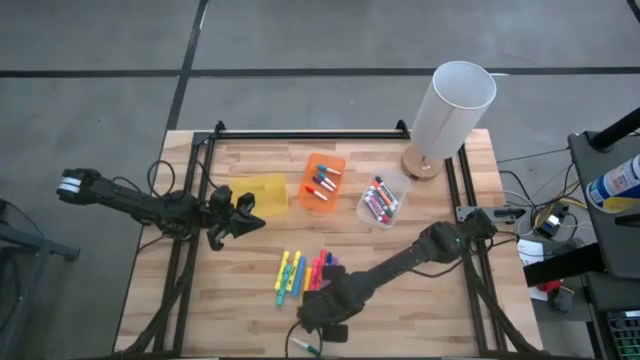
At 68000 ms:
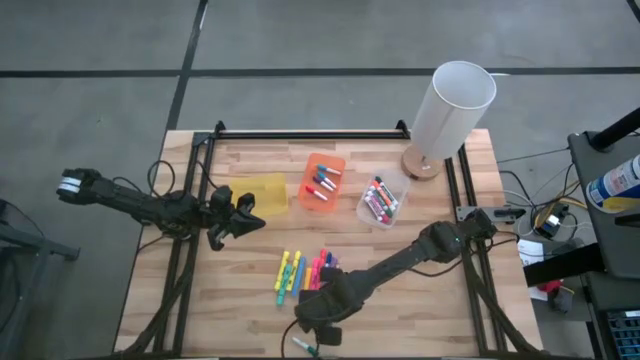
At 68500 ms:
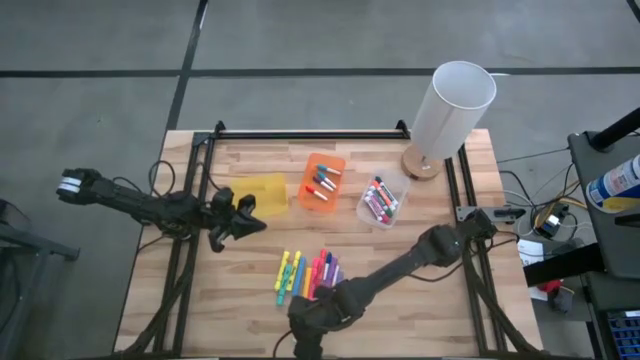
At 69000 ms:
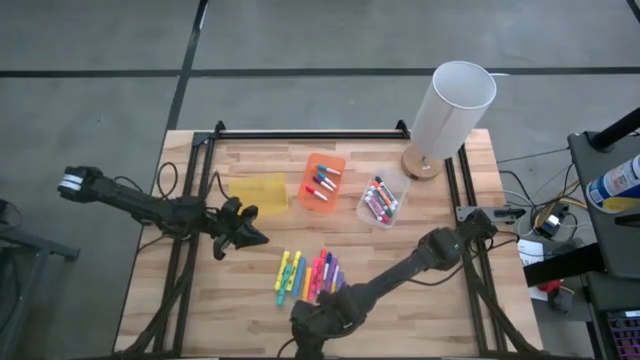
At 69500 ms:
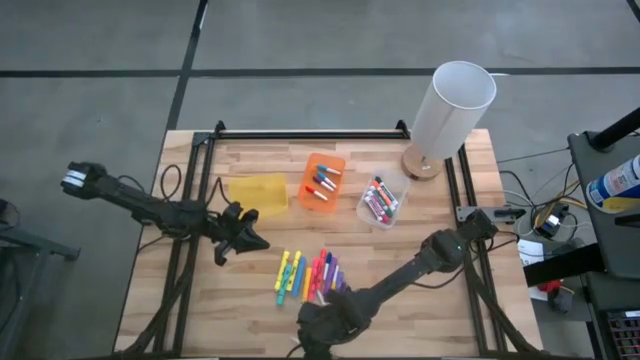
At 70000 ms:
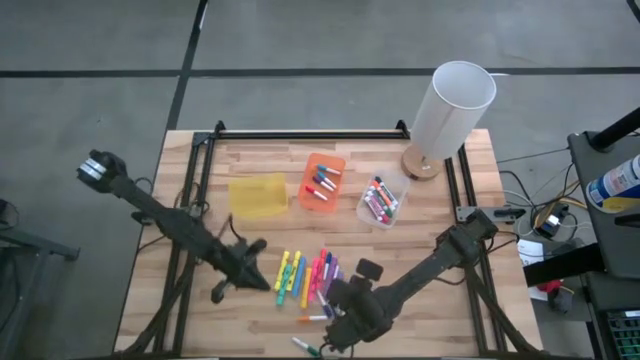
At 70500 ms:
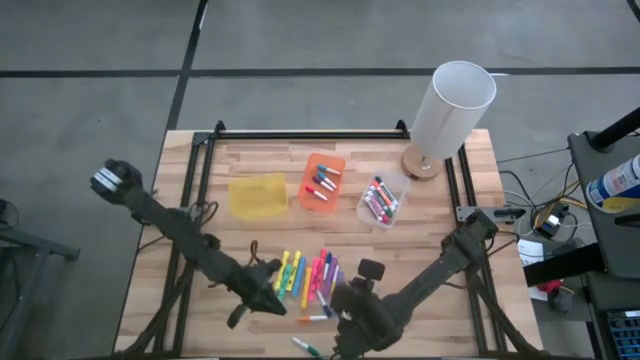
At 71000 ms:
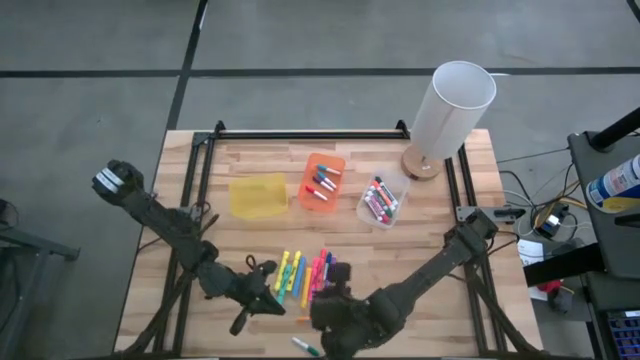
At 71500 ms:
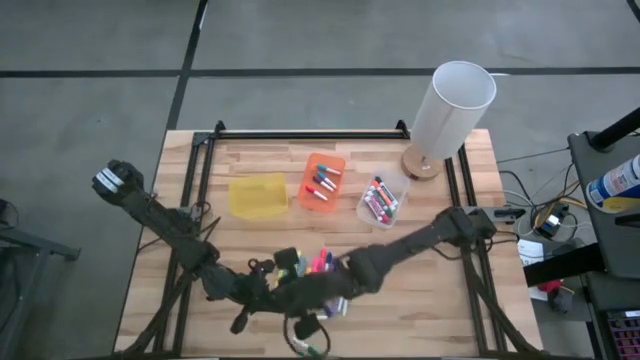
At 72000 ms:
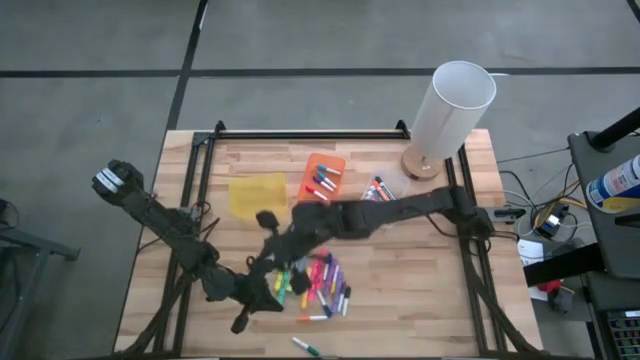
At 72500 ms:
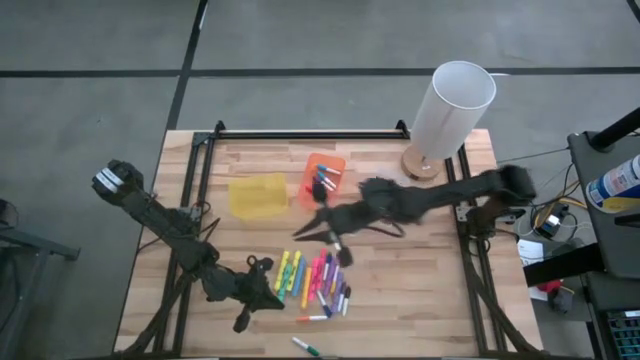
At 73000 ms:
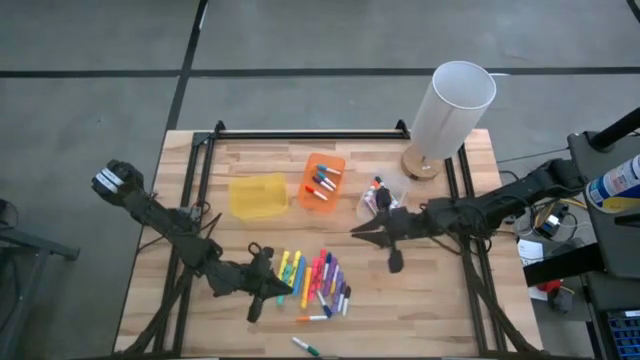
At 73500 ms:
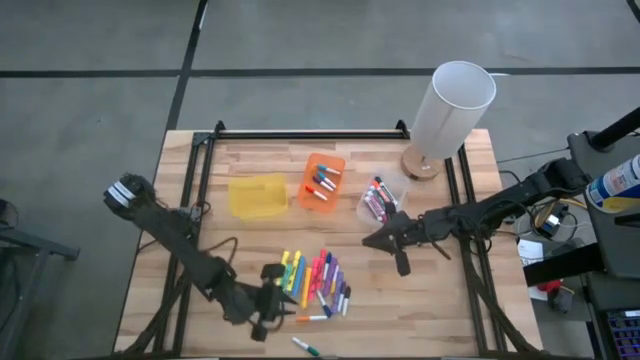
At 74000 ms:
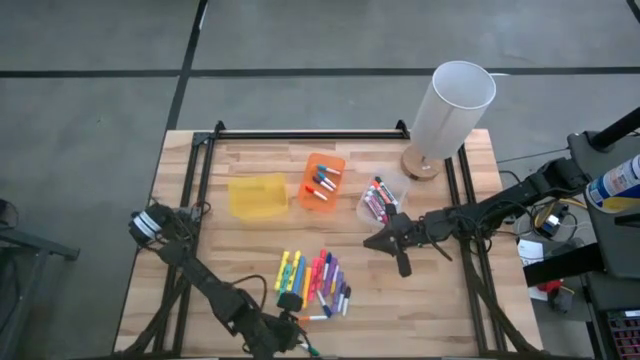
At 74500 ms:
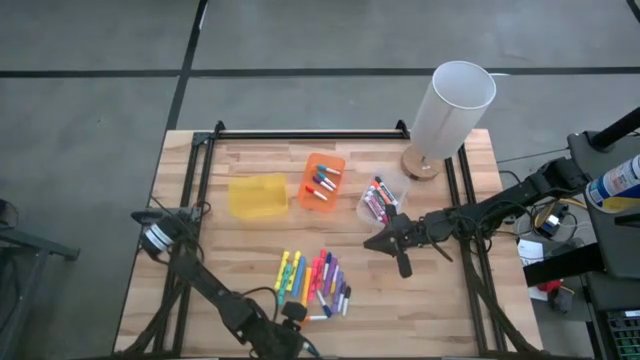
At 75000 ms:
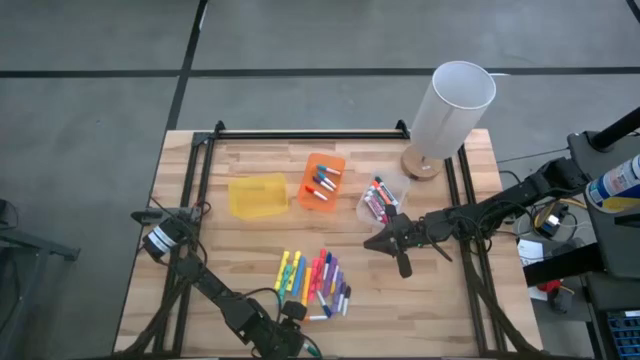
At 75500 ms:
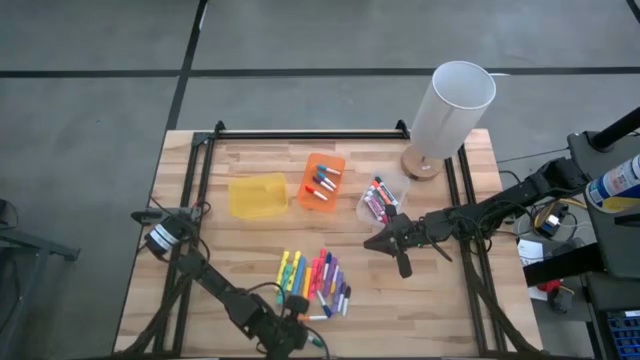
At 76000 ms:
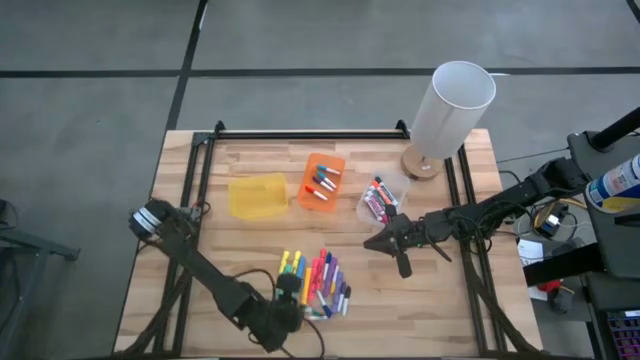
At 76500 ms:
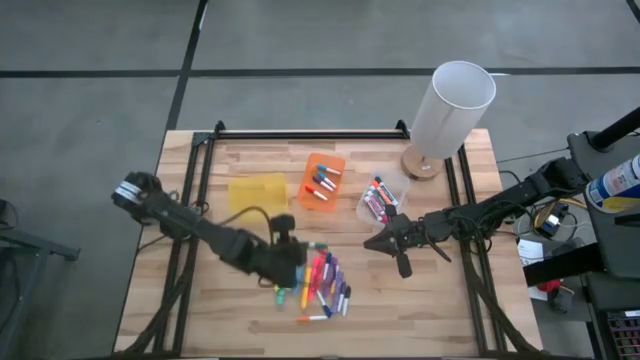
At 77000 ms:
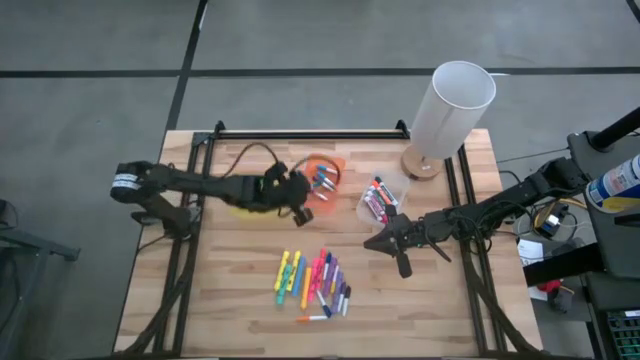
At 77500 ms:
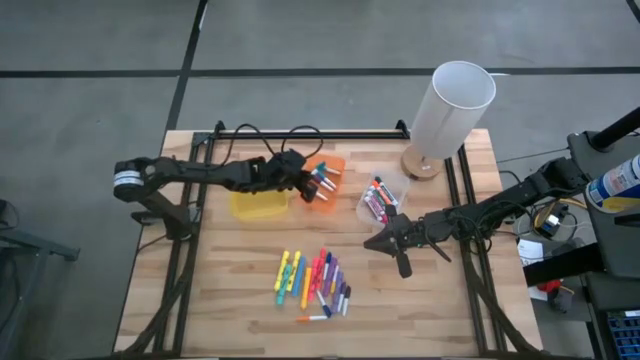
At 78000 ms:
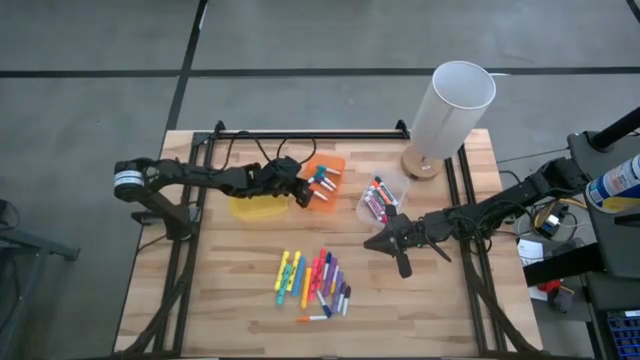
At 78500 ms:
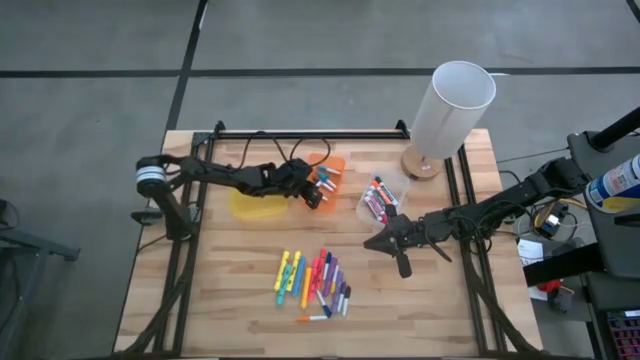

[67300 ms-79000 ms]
Task: Pick & Place Markers
Put the green pen into the orange bin

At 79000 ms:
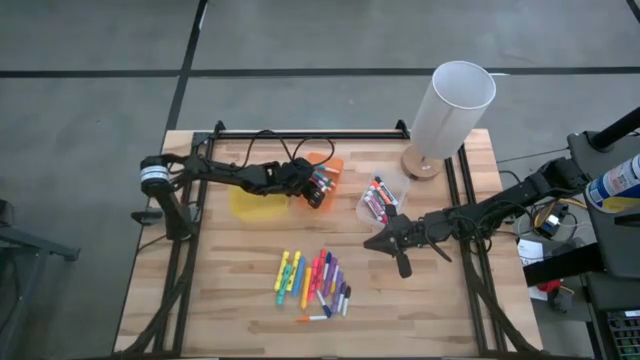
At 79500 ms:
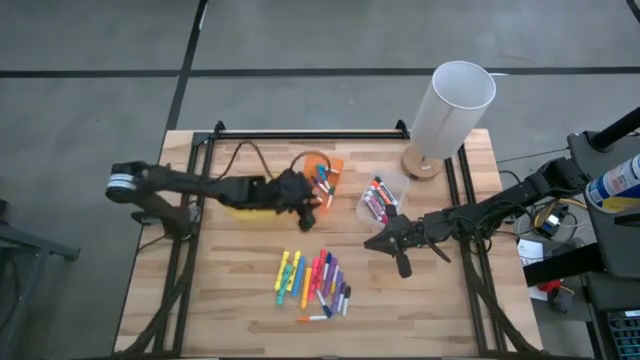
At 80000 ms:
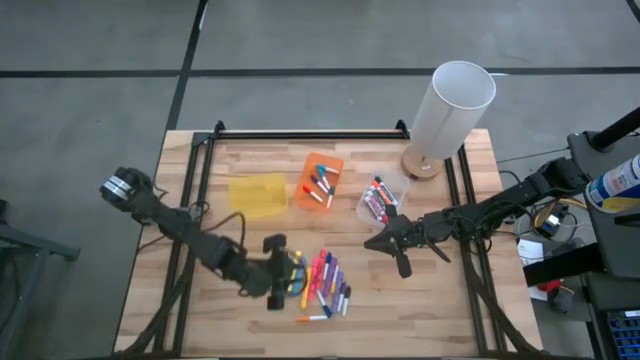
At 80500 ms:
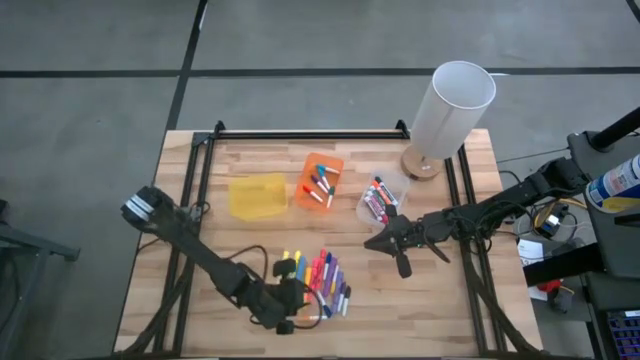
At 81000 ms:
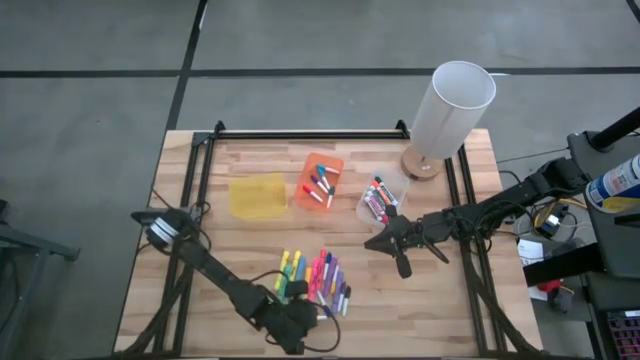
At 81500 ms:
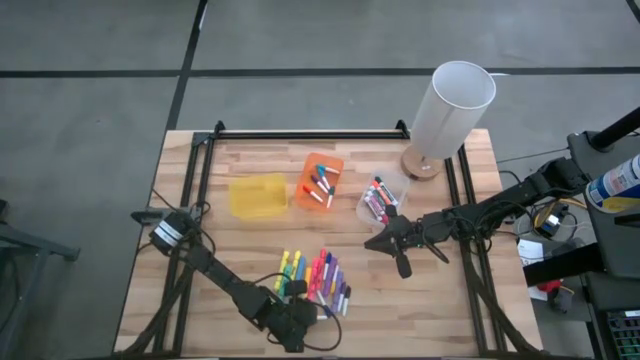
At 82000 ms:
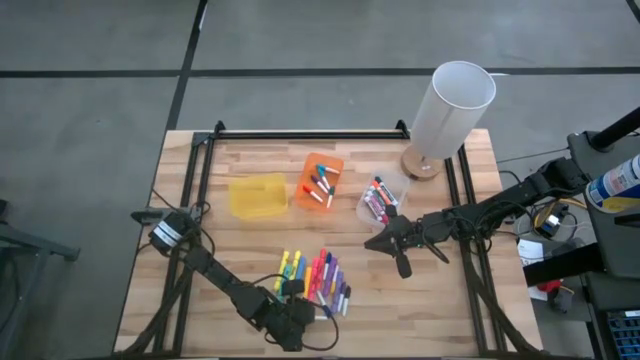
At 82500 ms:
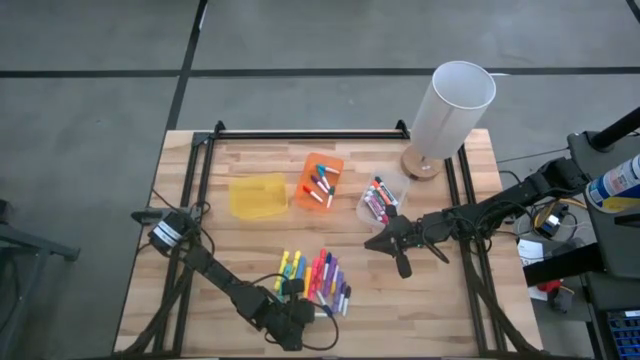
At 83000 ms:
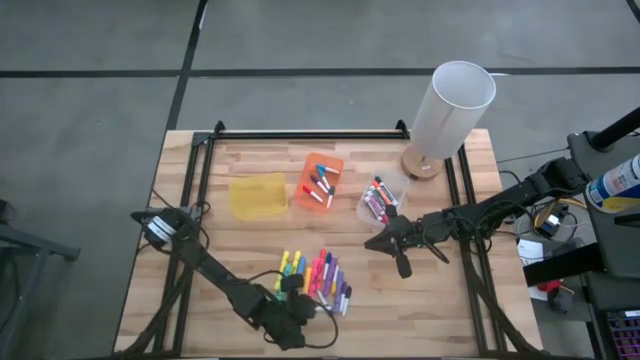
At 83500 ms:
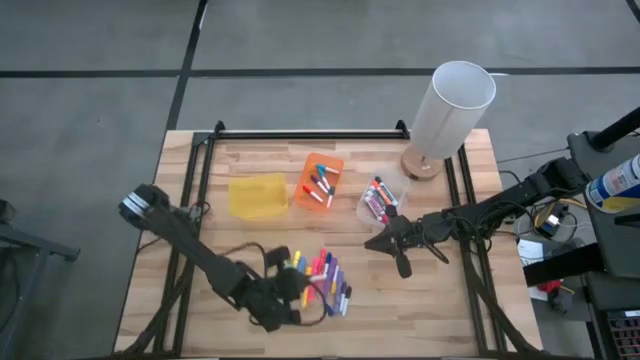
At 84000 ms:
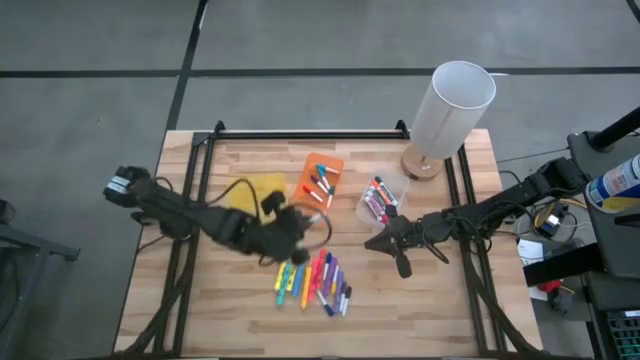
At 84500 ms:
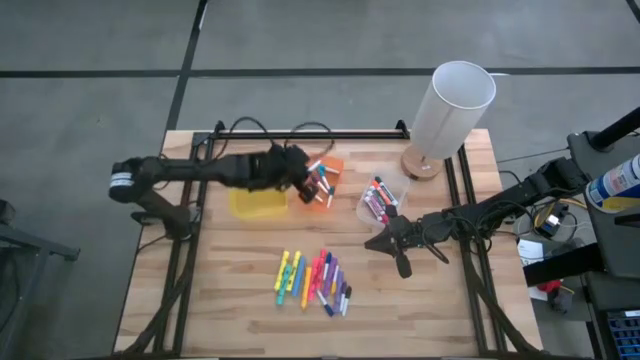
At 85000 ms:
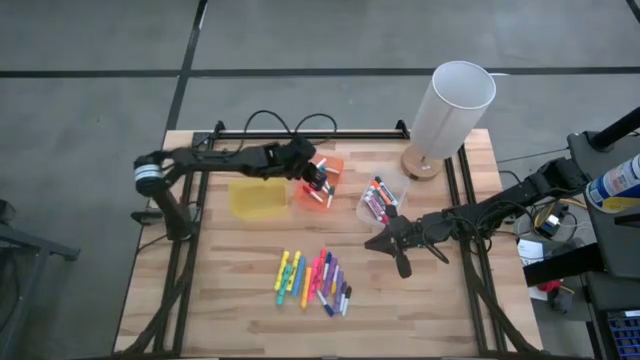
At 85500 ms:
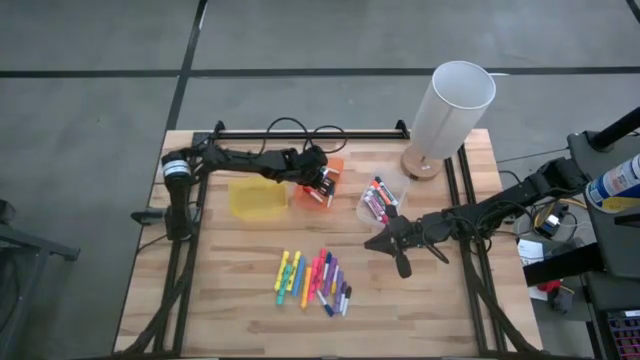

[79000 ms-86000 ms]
Put the orange pen into the orange bin

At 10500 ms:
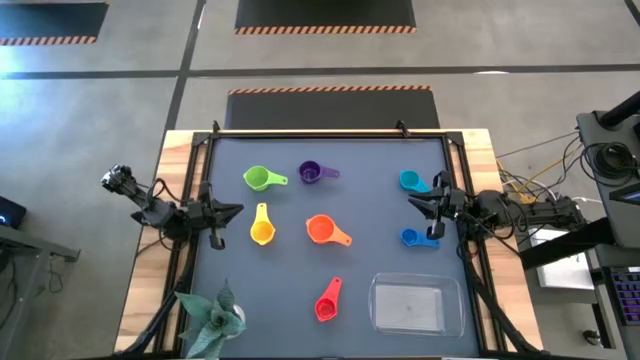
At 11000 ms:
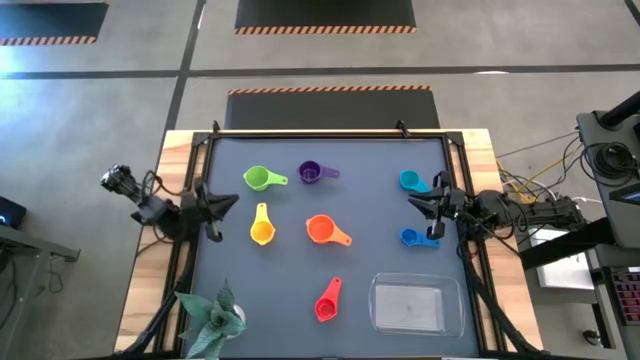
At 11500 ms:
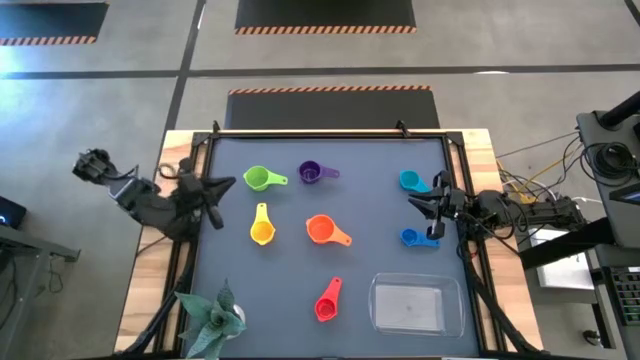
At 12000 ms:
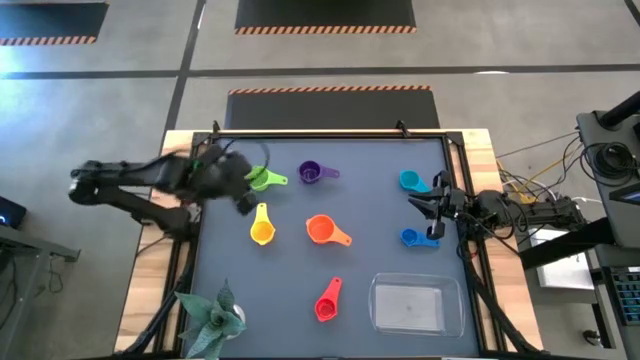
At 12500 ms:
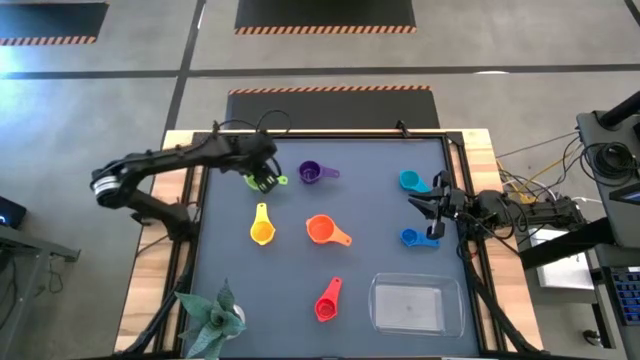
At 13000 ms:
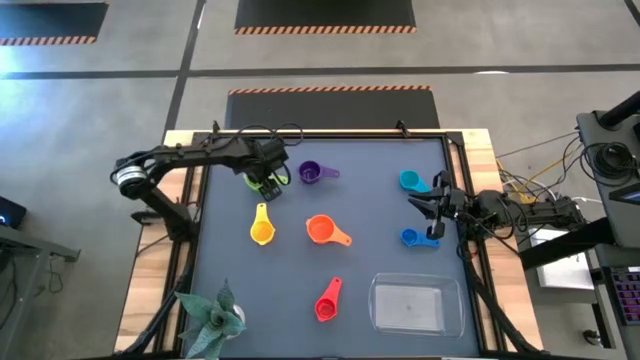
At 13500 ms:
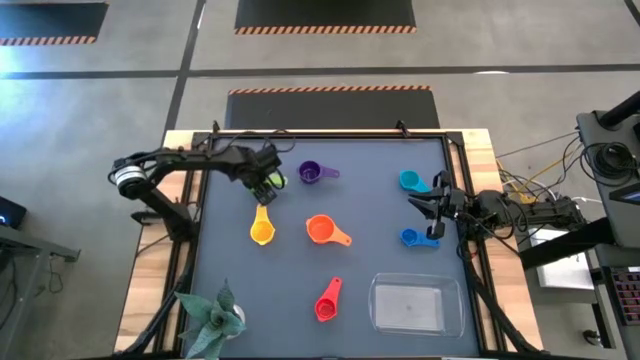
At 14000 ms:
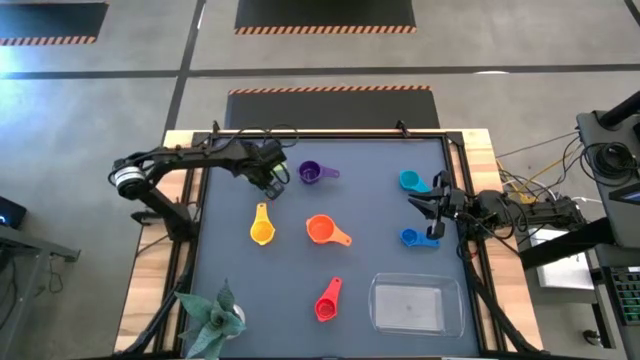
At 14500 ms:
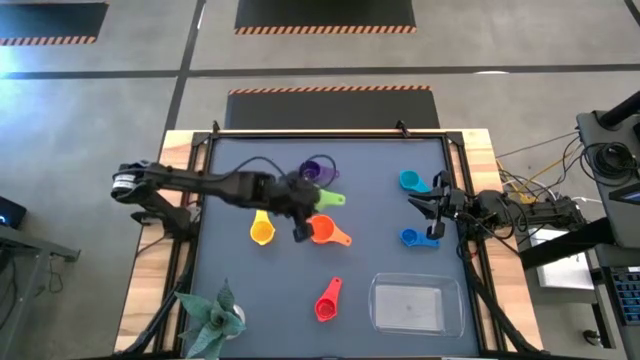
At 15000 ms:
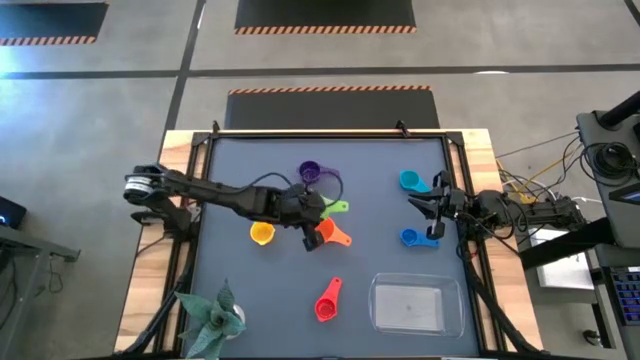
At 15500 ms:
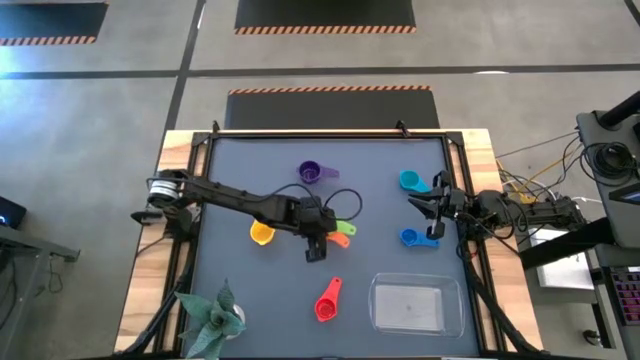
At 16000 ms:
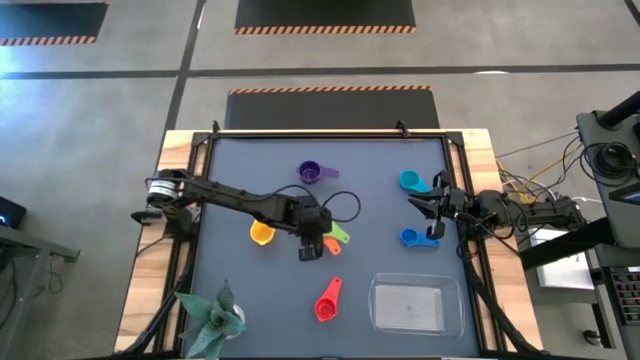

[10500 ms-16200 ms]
Task: Nest measuring cups in basket
Stack the green measuring cup on top of the orange measuring cup
